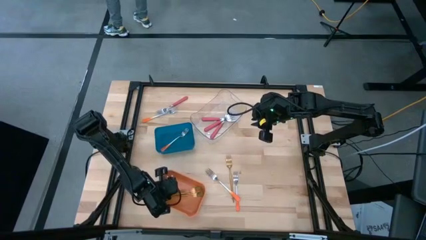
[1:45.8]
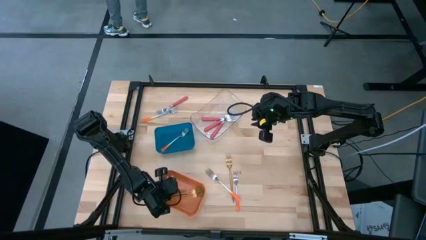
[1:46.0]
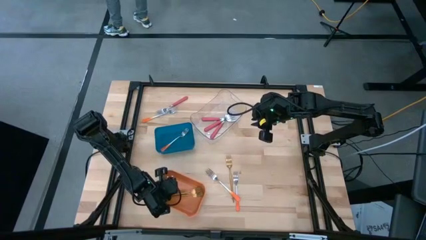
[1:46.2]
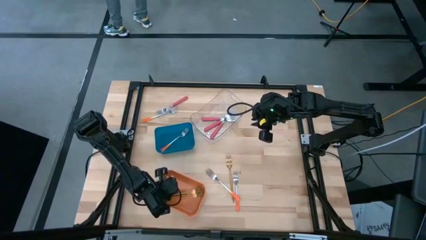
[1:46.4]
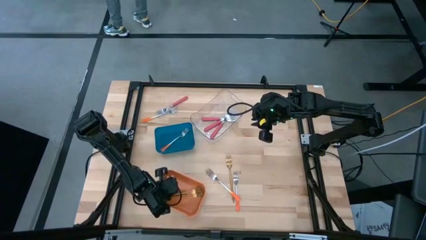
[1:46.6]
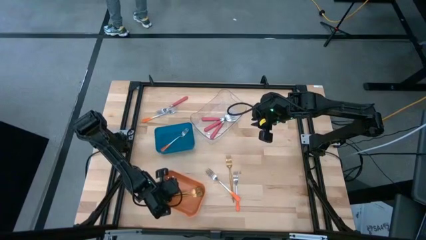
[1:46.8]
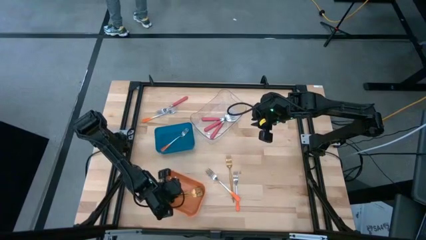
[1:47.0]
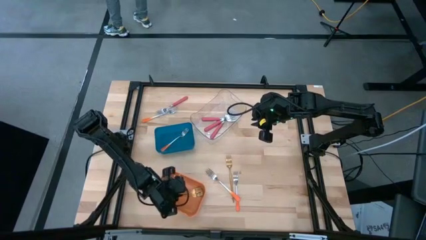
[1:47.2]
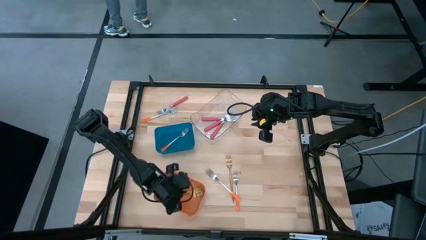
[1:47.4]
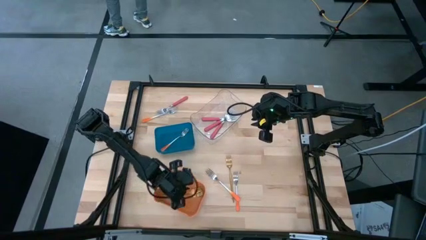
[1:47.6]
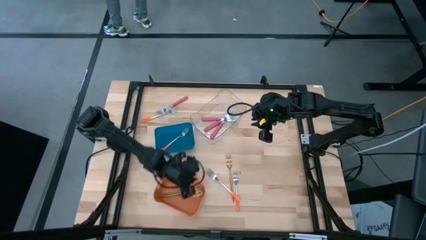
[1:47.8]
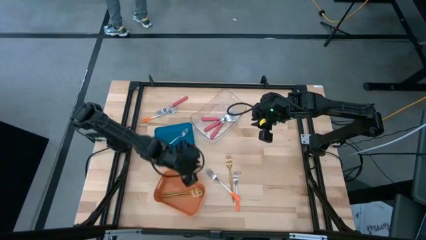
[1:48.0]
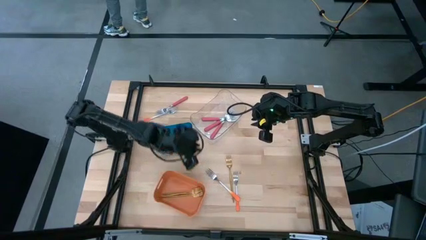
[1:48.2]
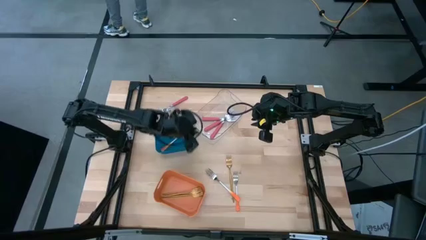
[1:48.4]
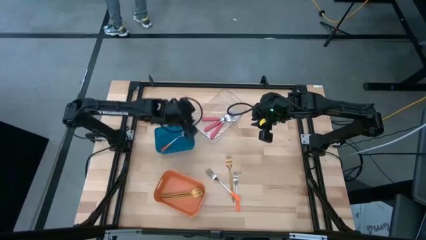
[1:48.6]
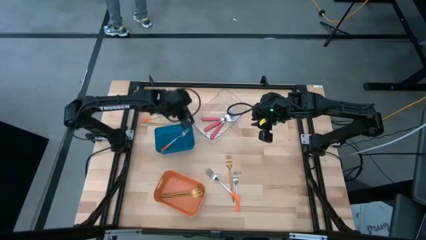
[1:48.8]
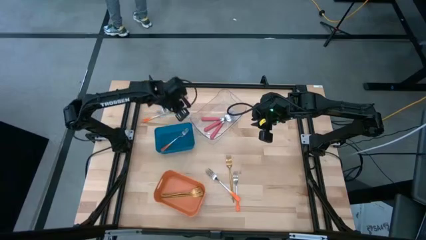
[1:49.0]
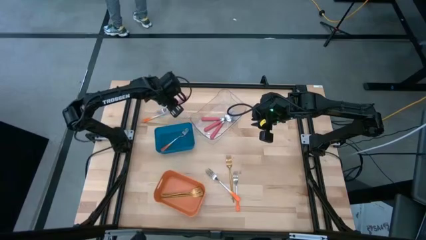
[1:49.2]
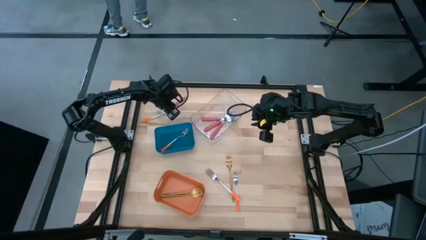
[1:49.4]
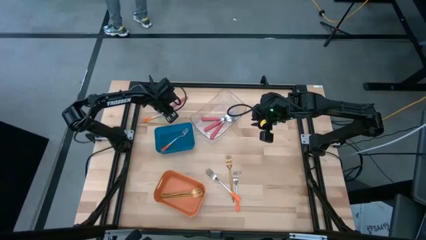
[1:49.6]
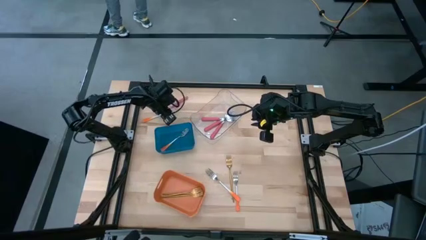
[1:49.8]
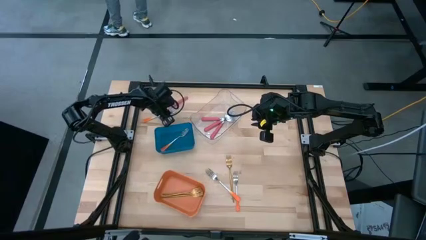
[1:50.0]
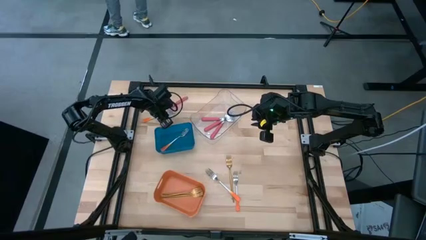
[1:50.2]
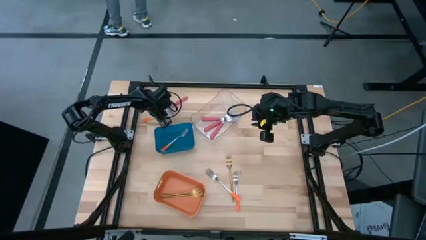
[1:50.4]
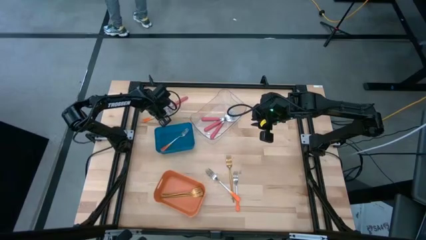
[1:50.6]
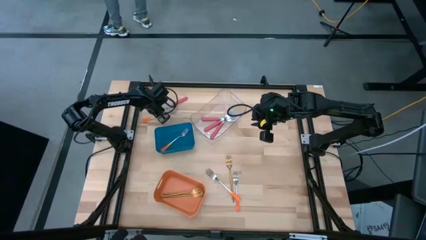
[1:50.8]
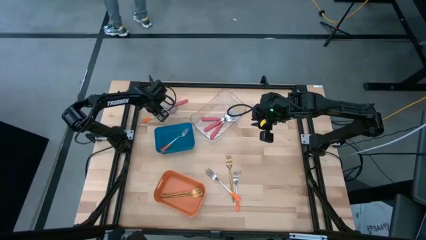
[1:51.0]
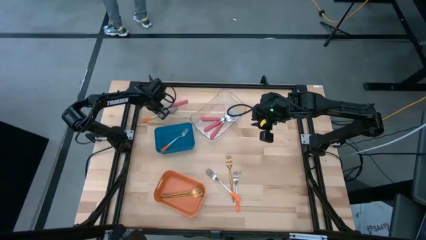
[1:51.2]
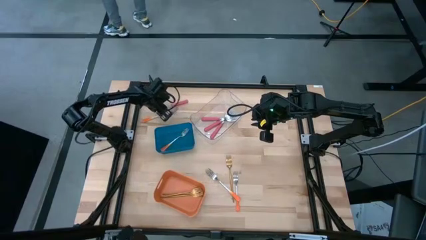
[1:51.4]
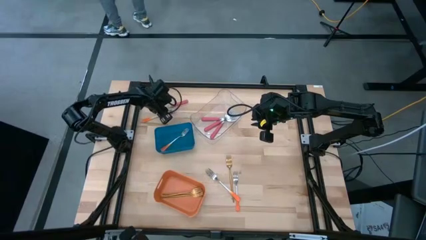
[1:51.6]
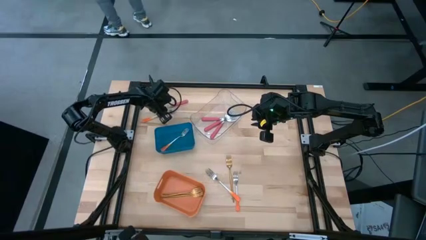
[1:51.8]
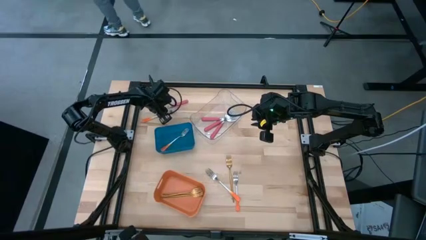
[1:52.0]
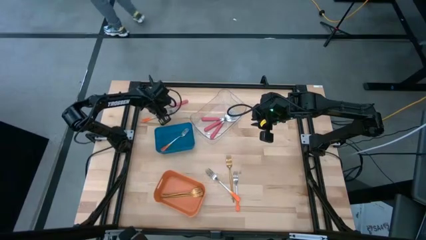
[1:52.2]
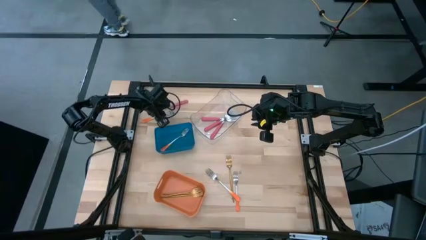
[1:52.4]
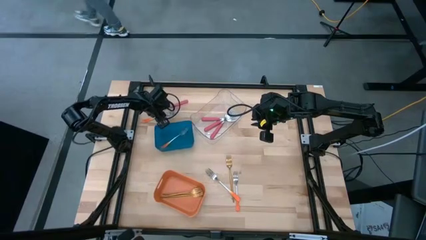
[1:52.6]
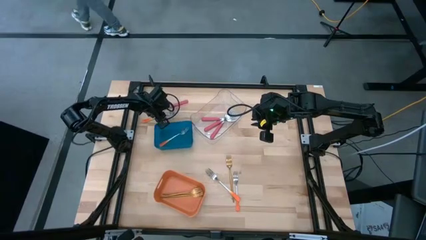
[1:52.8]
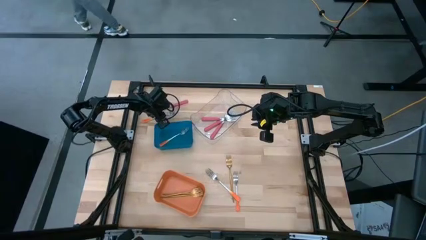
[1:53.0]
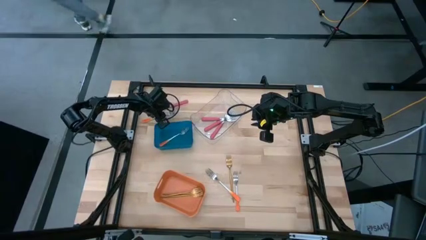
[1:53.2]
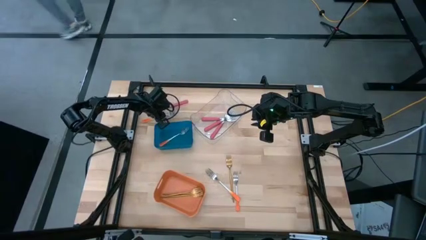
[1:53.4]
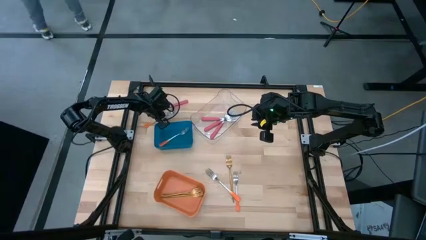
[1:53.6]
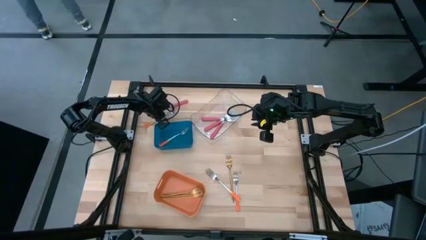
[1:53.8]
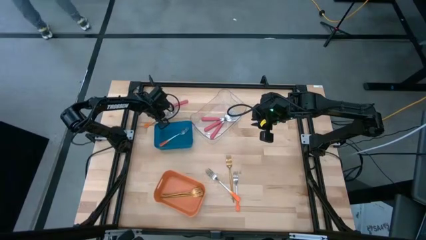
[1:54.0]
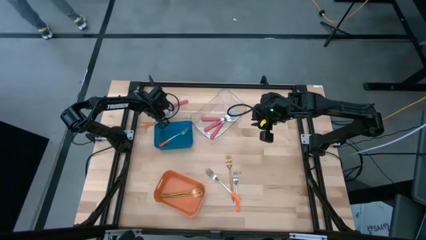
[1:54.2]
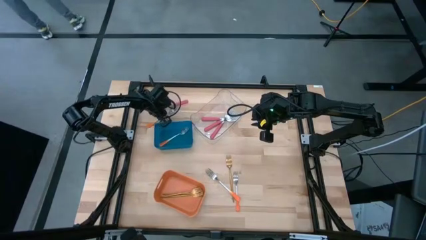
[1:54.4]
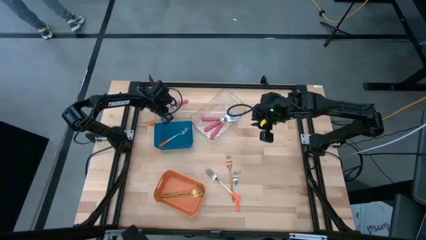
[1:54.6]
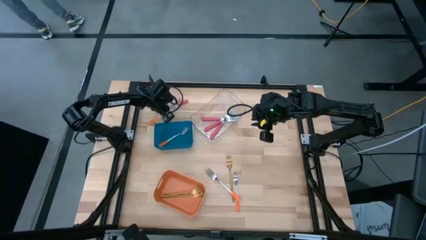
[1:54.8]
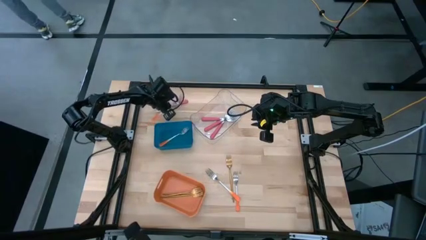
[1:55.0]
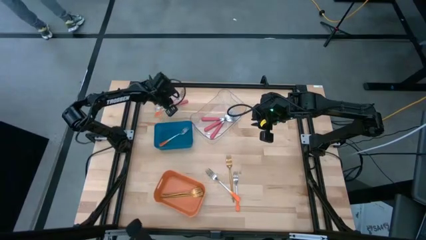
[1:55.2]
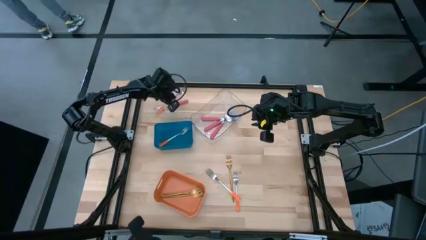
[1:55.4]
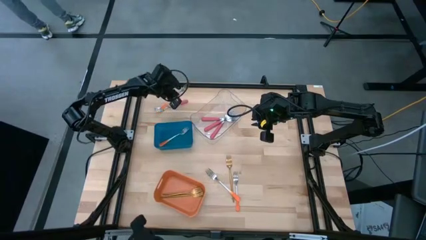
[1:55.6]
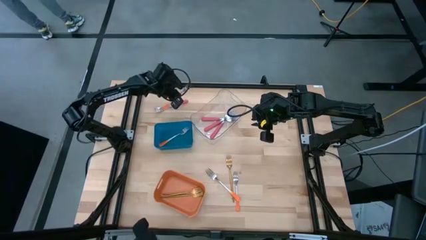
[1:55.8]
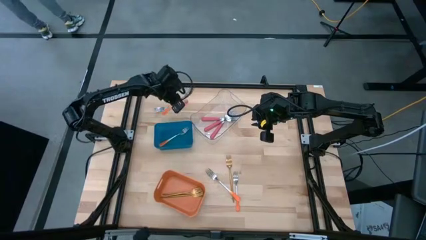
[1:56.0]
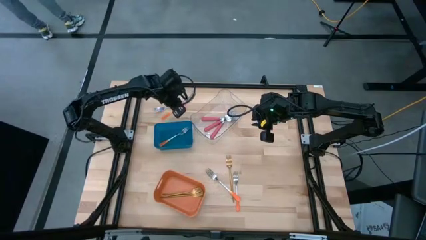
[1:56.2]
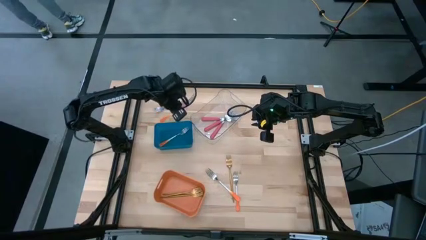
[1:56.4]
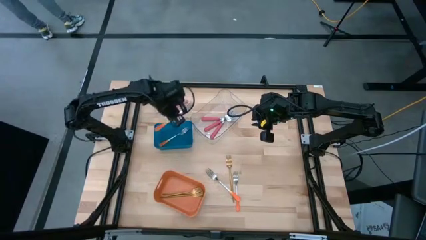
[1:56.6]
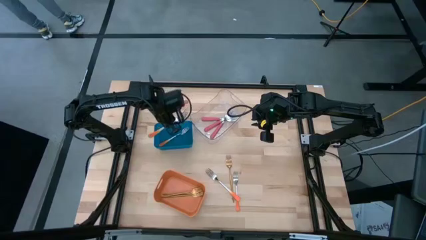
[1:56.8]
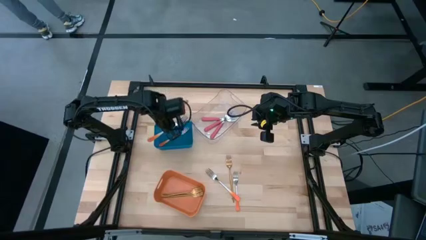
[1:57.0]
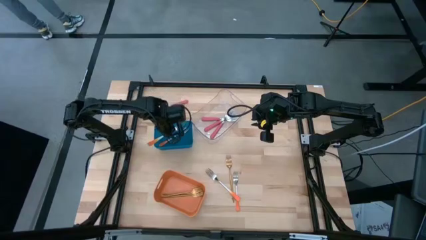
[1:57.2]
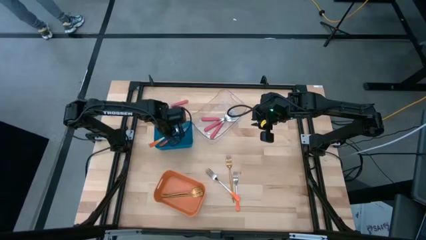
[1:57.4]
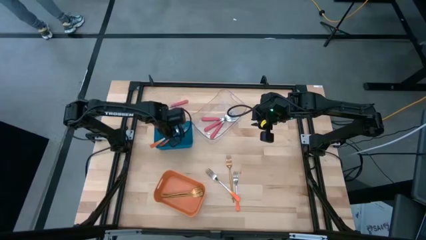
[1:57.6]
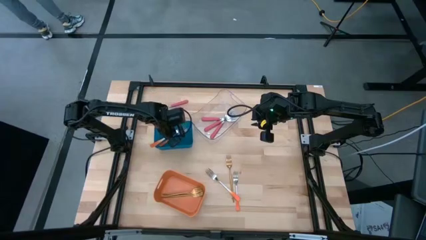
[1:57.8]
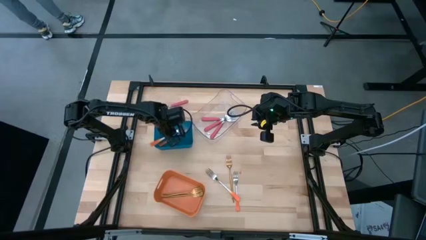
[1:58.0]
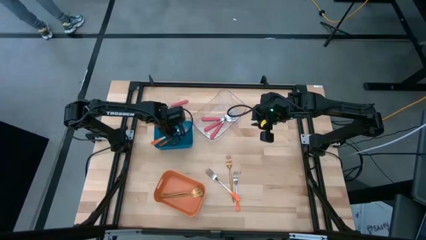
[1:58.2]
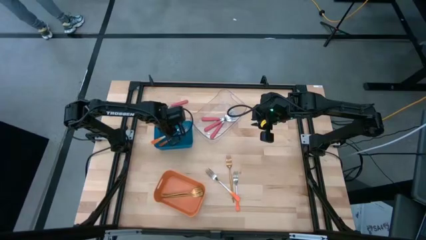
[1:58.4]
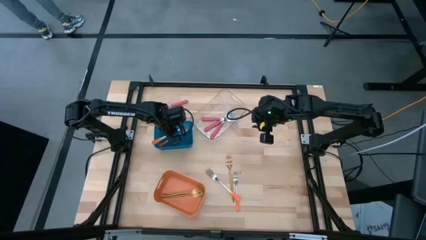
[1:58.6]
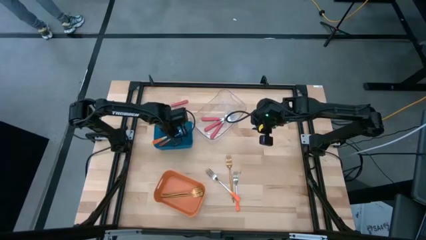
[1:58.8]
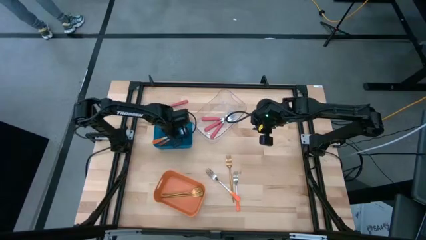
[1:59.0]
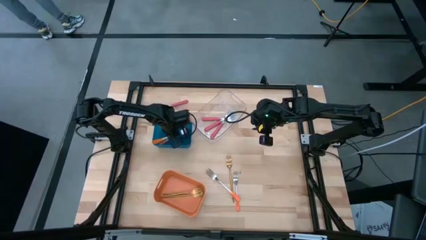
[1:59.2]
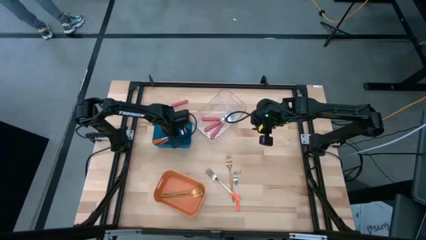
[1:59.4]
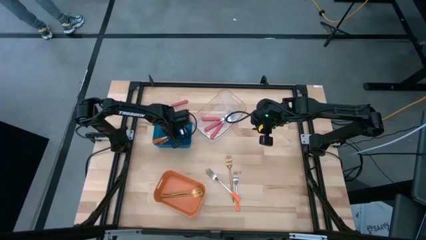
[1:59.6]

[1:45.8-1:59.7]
Task: Sort silverware by color (type)
Put the orange fork into the blue bin
